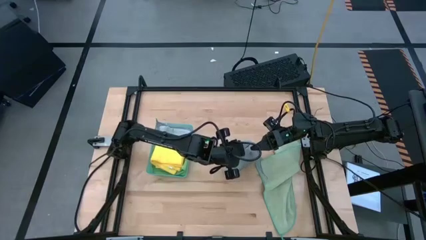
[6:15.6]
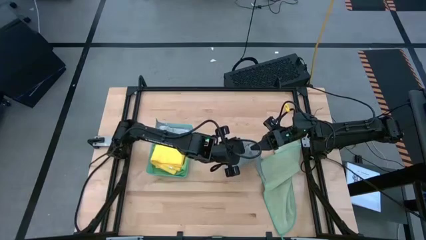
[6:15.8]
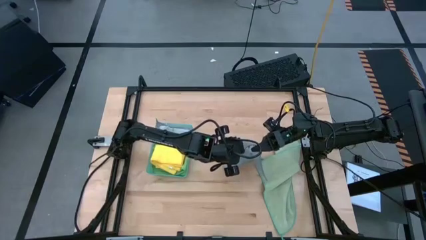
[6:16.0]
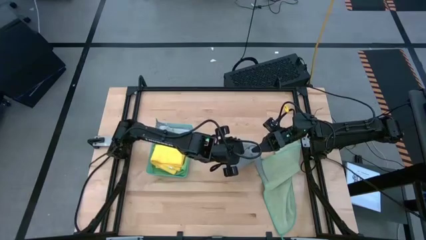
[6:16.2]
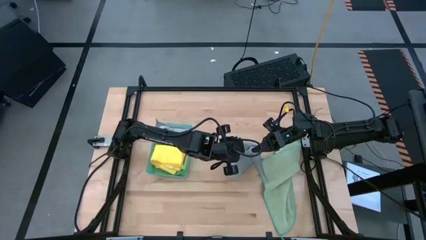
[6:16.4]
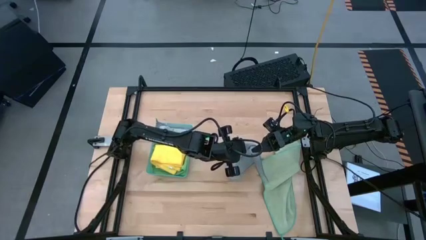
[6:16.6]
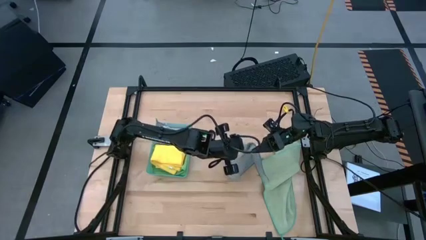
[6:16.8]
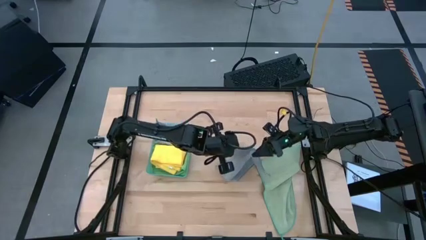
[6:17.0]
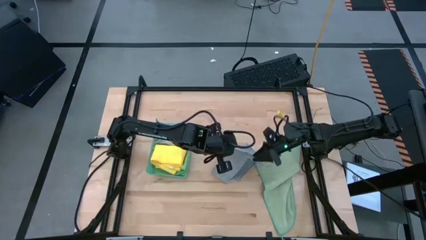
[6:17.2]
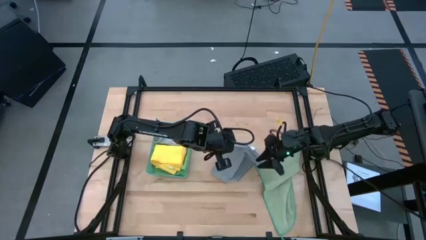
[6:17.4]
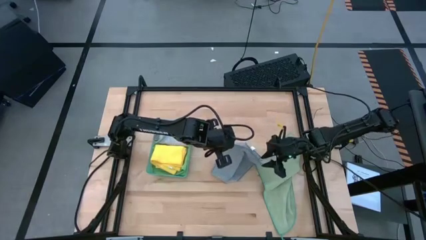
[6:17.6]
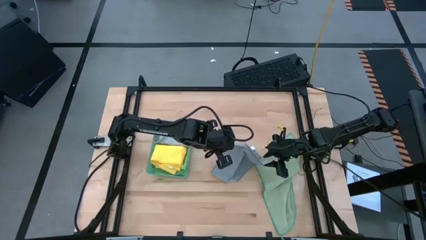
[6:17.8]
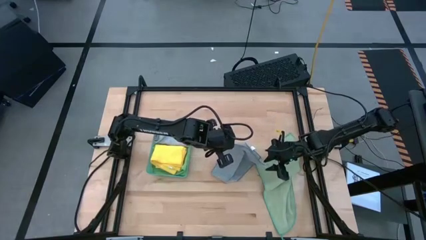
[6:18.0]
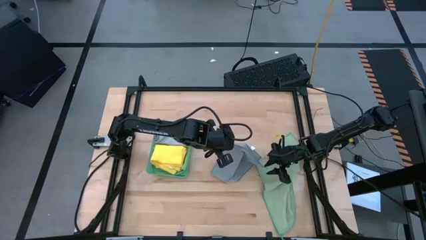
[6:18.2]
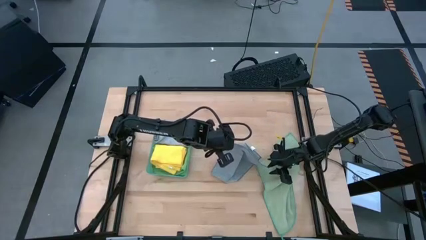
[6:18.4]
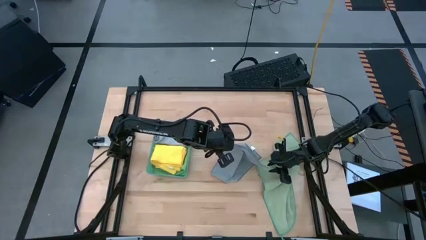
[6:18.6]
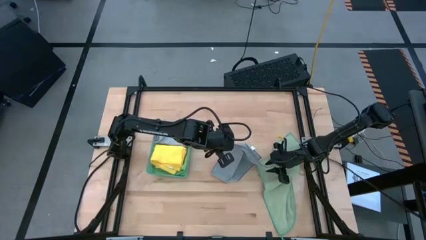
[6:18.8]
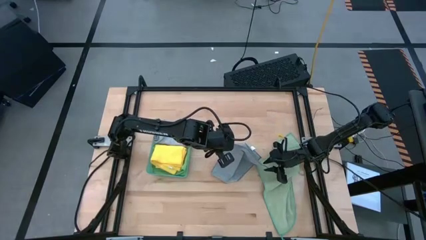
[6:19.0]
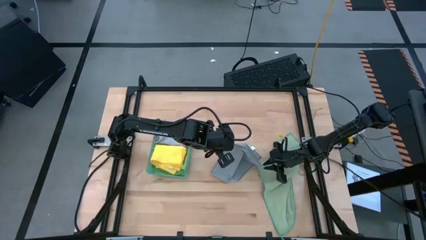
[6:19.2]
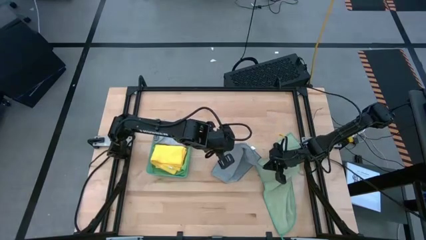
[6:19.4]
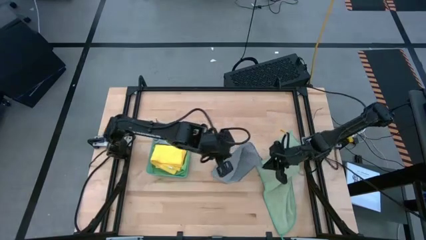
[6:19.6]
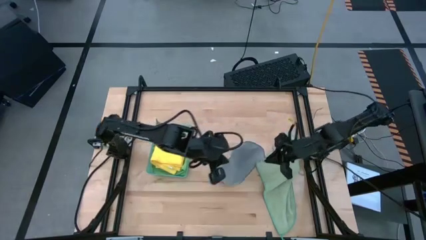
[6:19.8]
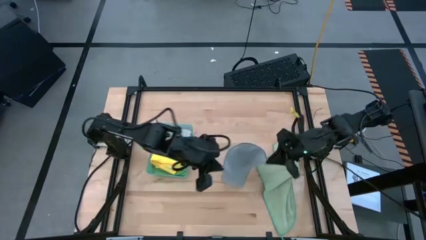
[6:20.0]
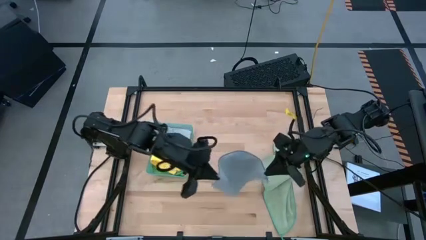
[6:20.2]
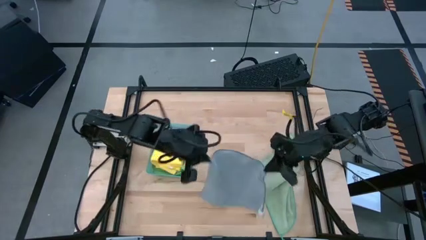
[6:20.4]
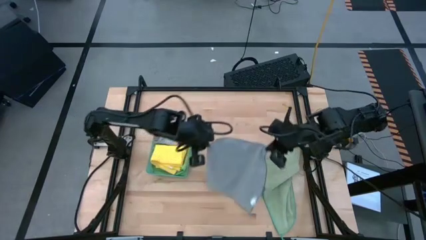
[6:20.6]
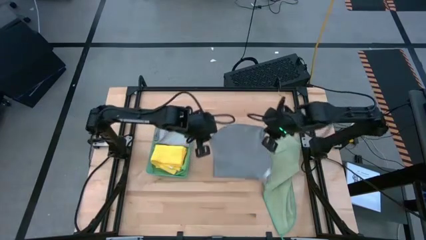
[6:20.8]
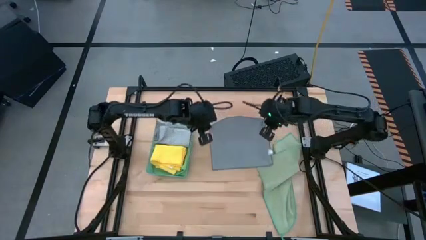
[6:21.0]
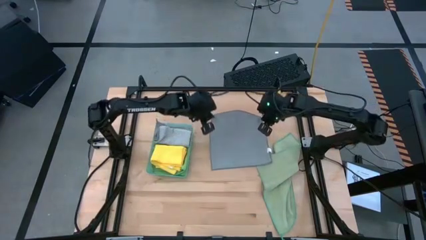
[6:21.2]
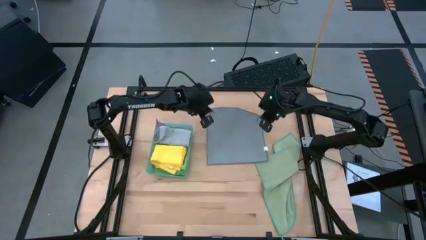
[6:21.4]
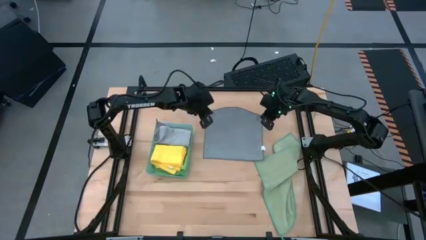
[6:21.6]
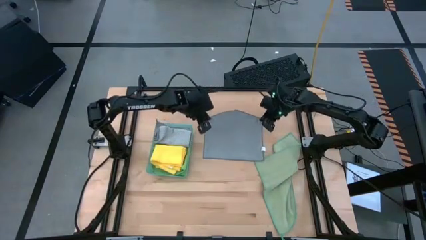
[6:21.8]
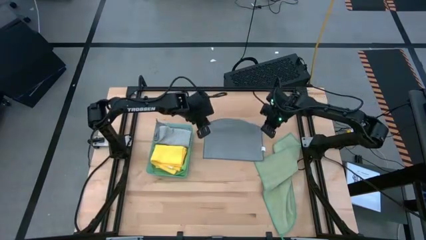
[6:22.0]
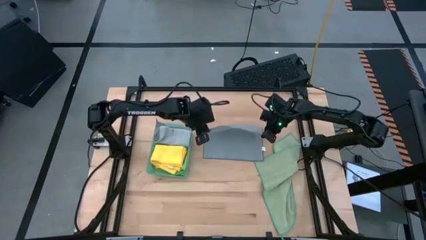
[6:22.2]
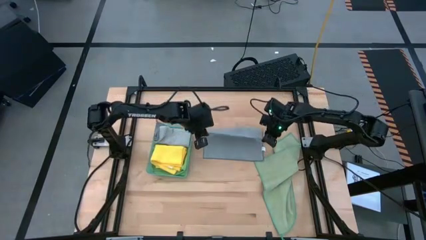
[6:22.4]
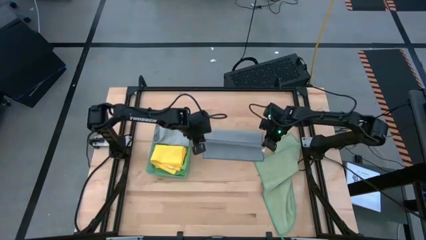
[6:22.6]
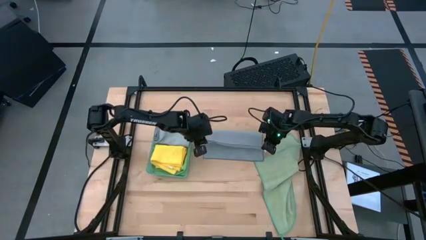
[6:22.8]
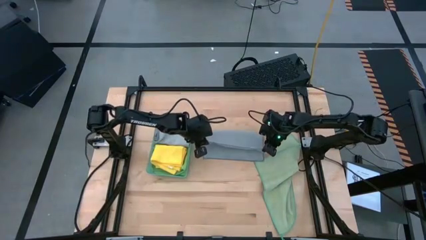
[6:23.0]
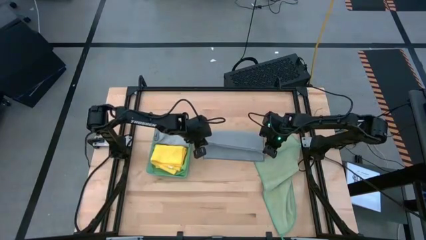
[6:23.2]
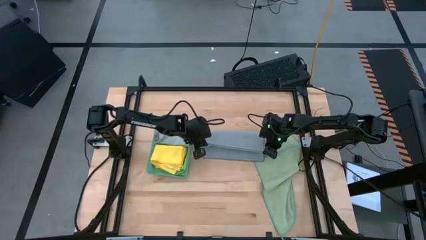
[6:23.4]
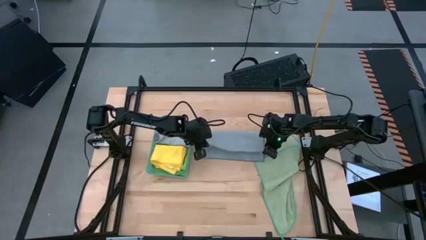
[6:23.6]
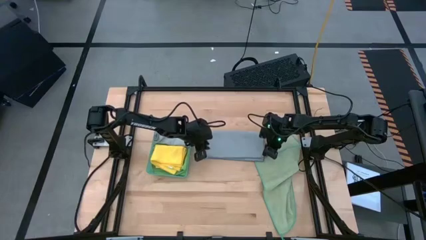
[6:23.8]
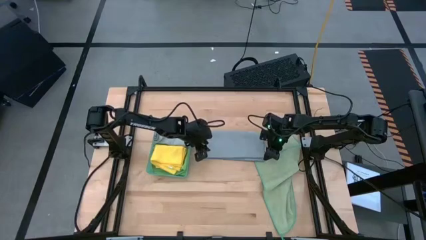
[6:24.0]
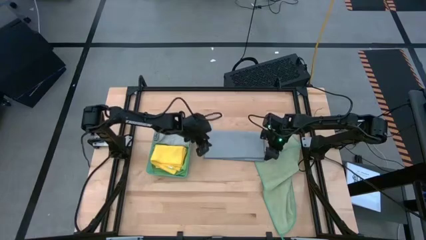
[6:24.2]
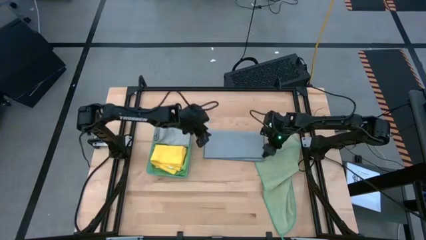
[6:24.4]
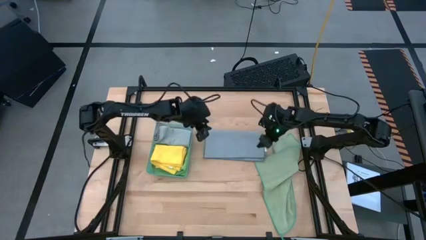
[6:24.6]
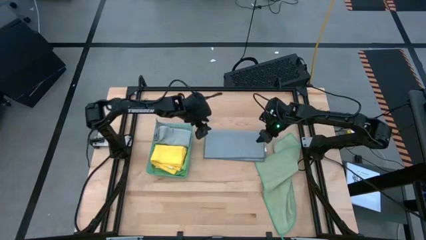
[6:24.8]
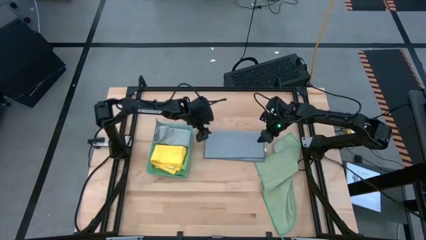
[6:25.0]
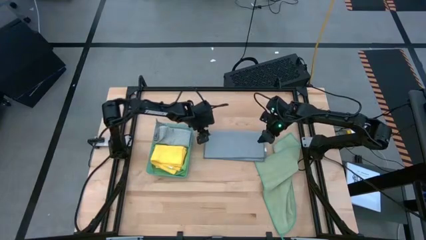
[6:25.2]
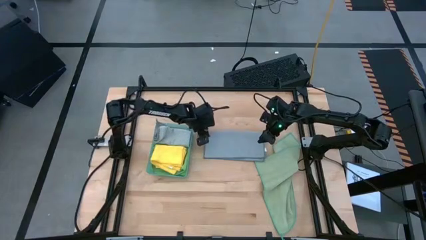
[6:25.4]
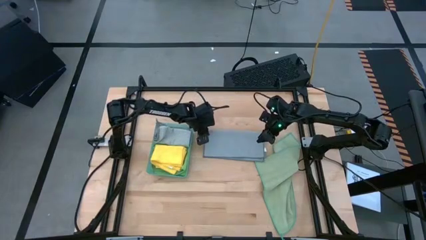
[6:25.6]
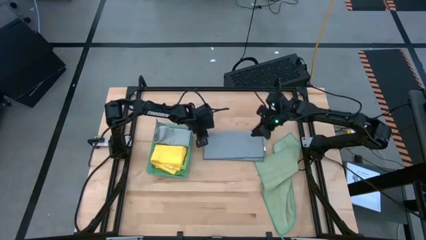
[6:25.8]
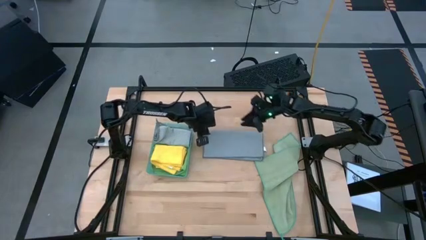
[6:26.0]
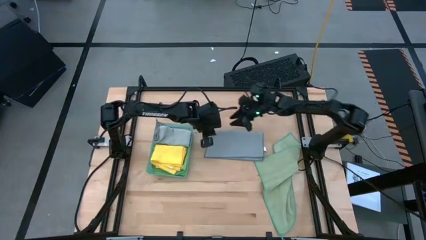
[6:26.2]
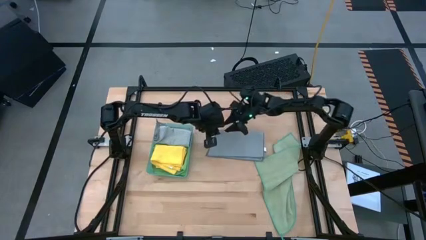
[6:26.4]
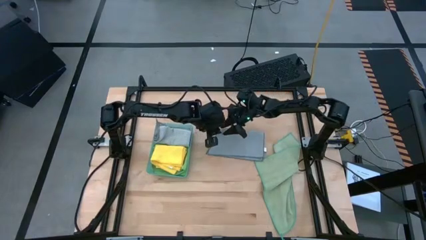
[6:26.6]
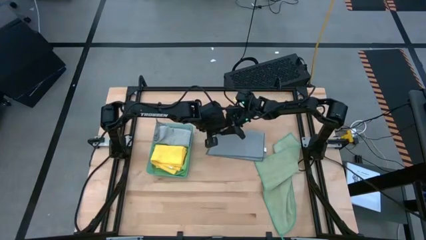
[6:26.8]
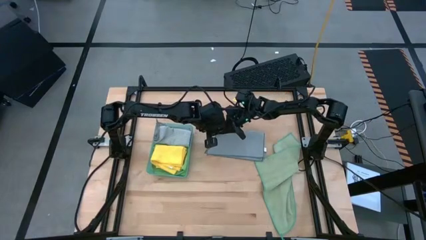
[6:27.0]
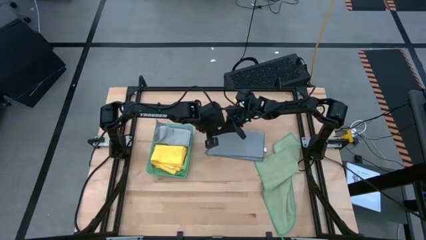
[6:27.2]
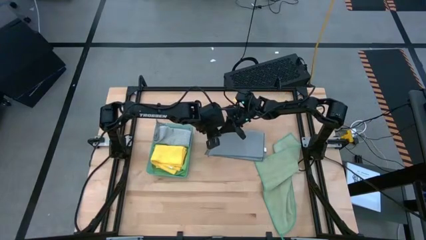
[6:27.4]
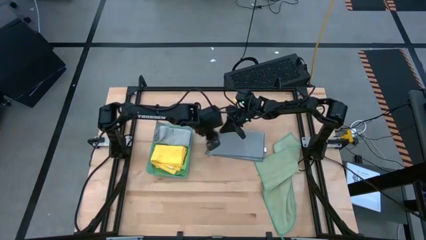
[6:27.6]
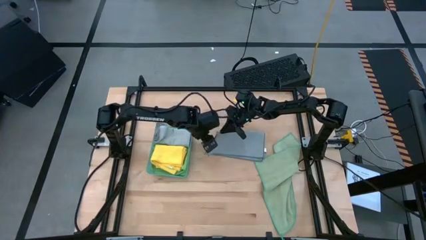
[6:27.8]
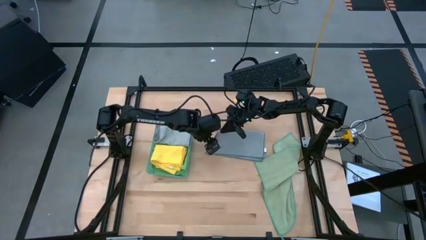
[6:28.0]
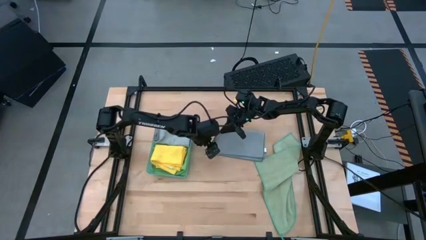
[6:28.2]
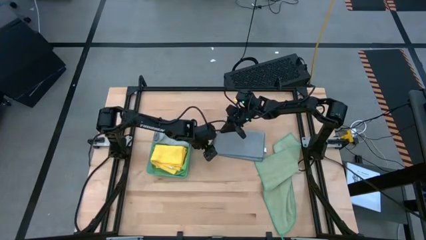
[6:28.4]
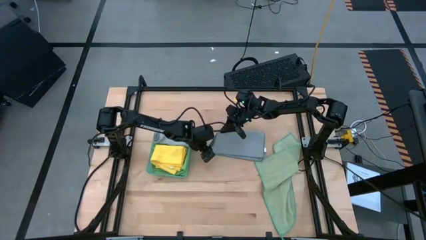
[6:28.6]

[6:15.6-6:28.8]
Task: Fold microfiber towels
Fold the gray microfiber cloth

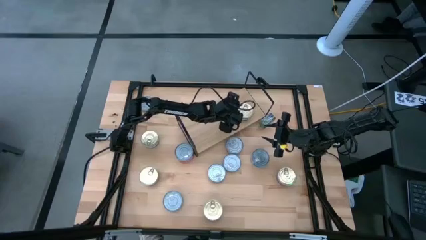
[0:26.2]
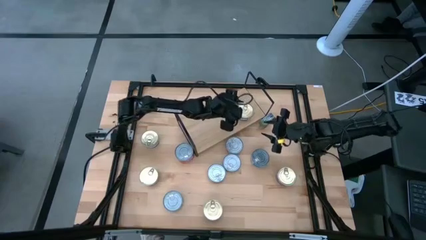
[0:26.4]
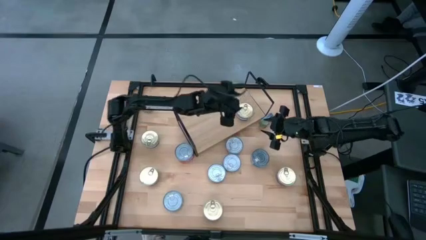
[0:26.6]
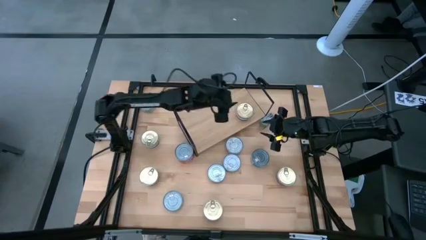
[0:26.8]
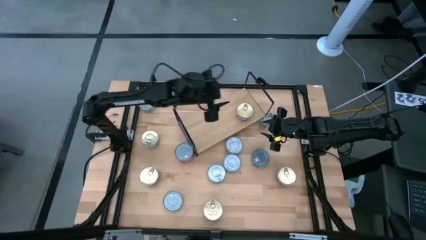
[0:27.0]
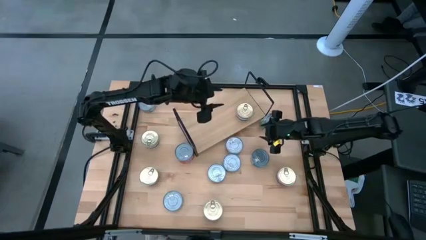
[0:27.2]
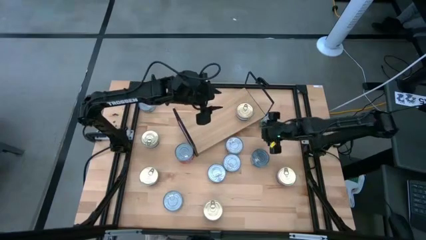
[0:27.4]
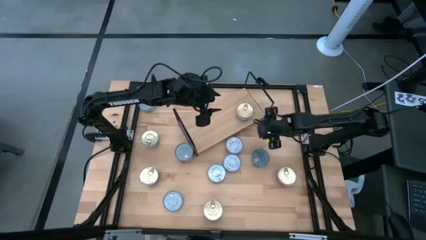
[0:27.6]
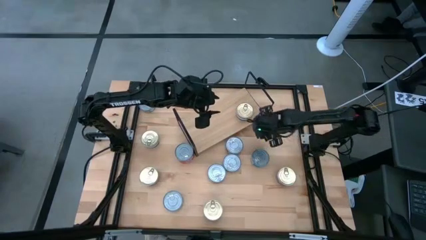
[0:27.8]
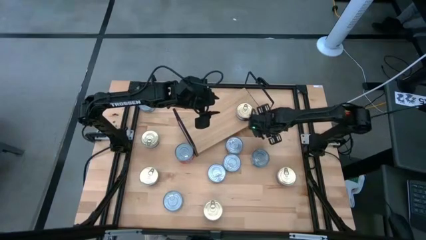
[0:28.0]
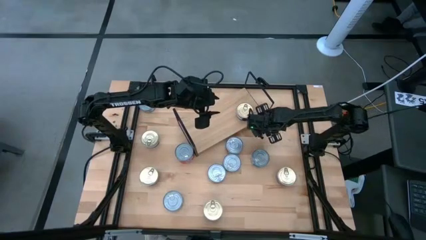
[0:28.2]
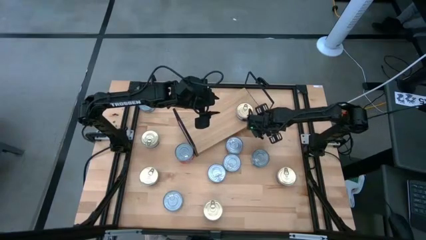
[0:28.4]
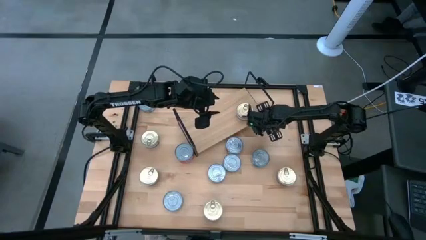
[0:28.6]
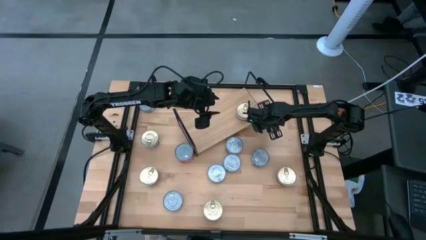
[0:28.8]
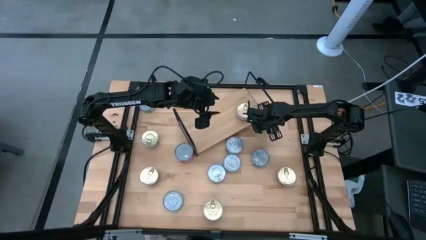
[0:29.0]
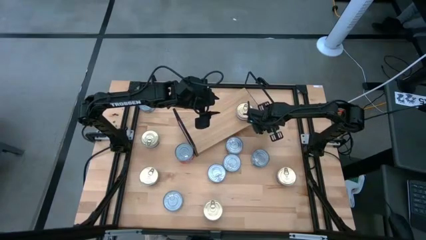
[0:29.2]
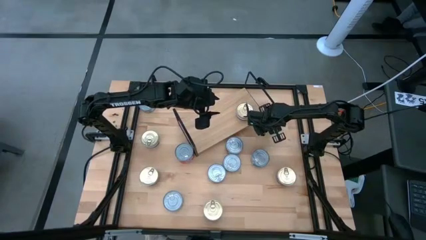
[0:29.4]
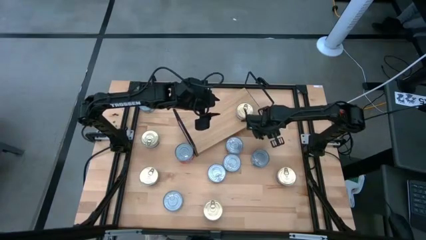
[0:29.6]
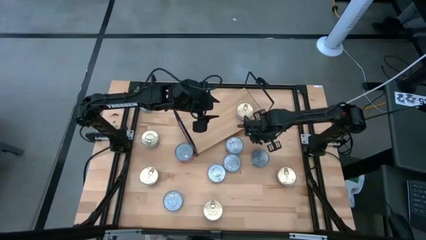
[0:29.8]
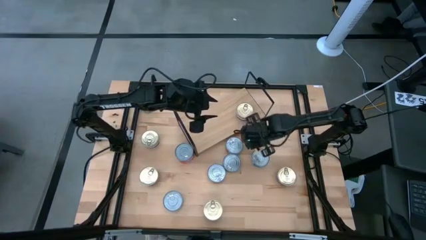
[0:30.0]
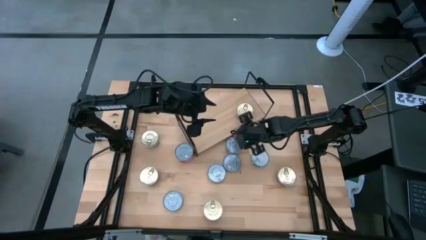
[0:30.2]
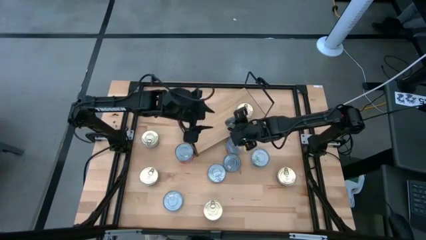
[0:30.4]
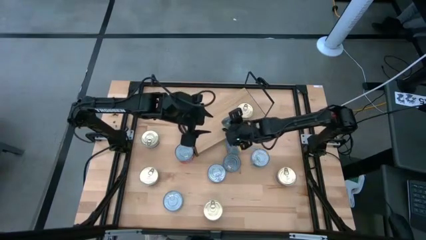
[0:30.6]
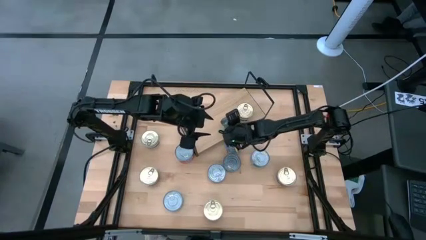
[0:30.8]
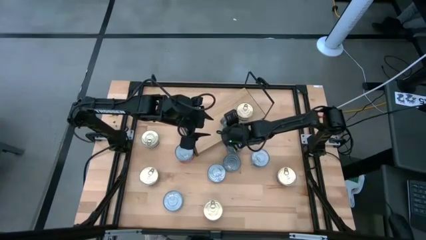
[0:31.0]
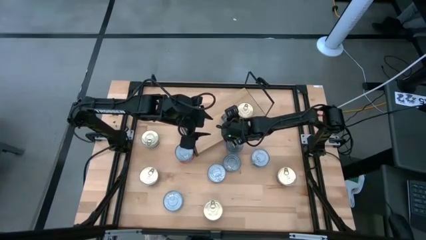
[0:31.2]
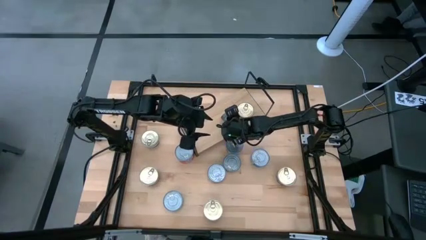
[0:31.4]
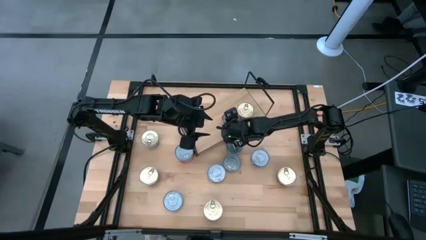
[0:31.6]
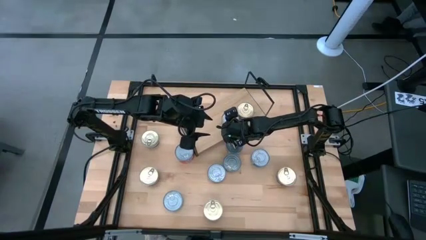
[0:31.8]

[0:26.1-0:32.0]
Task: Stack canned seafood by type on shelf
Put the green tuna can on the shelf
